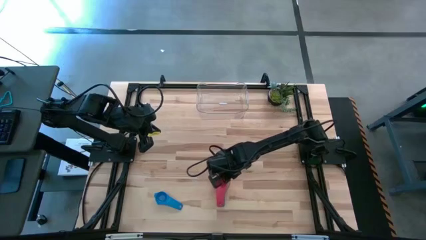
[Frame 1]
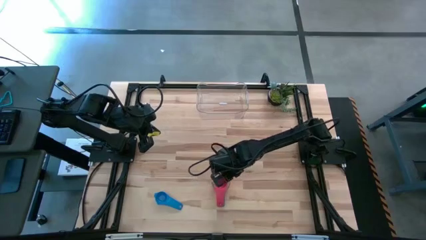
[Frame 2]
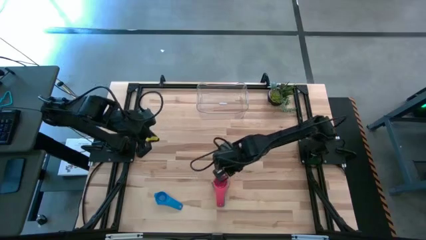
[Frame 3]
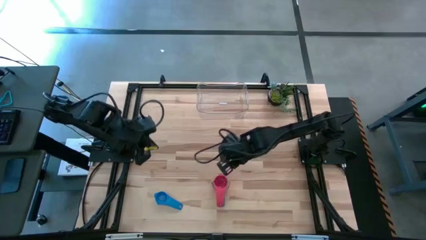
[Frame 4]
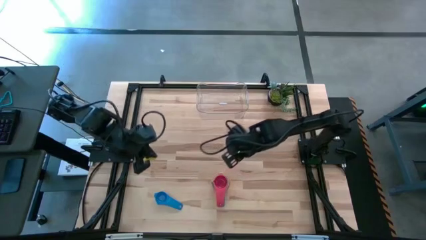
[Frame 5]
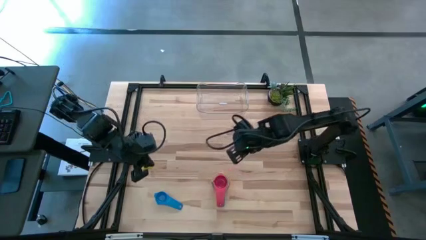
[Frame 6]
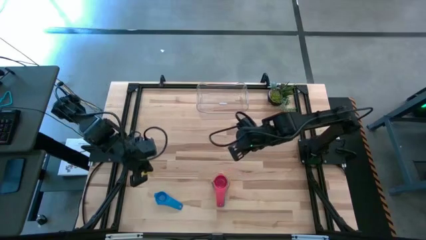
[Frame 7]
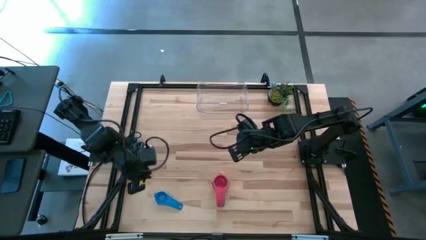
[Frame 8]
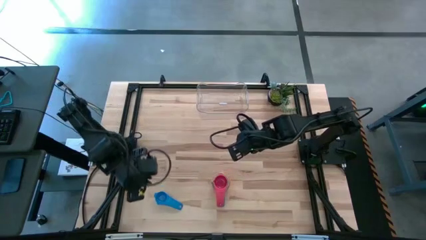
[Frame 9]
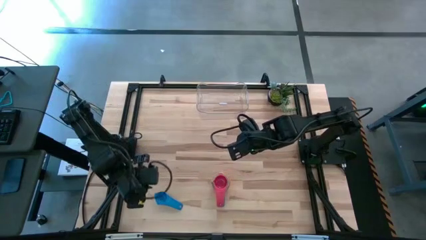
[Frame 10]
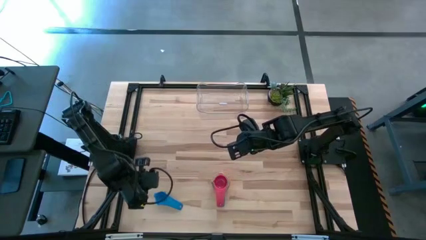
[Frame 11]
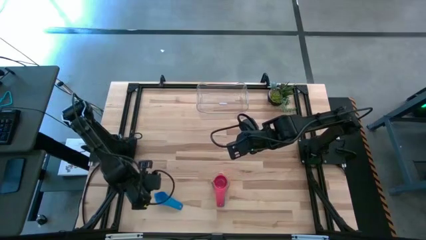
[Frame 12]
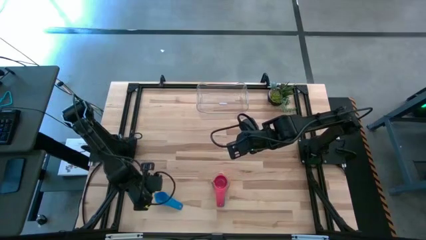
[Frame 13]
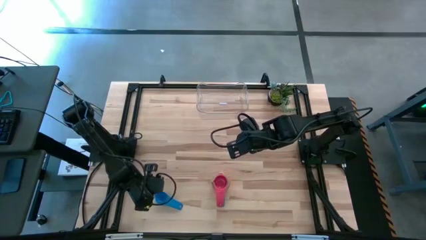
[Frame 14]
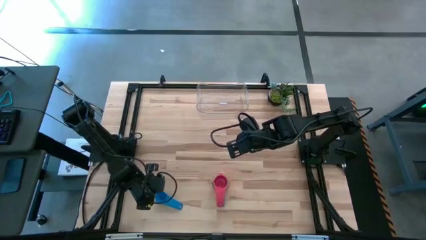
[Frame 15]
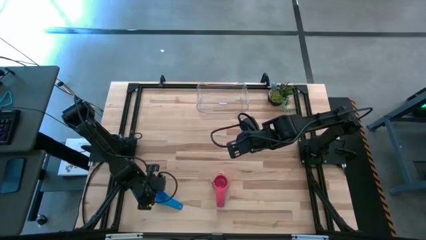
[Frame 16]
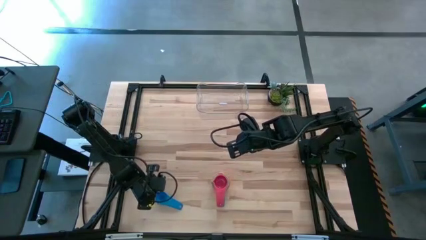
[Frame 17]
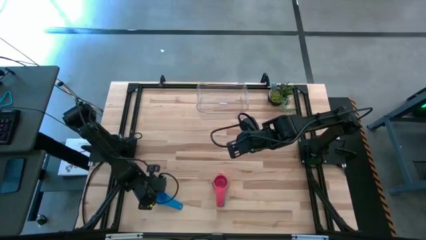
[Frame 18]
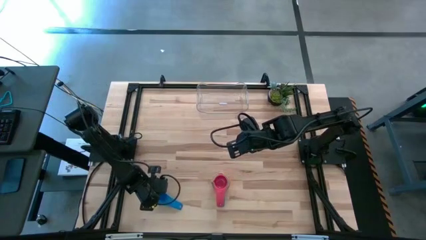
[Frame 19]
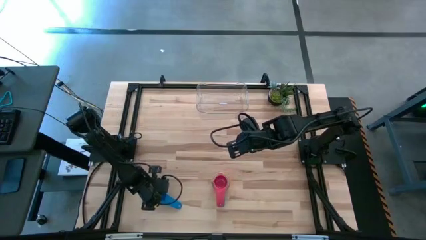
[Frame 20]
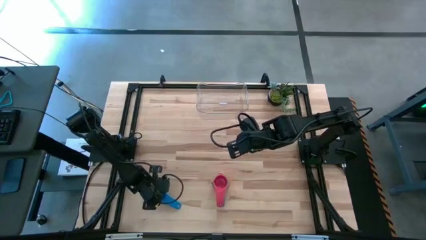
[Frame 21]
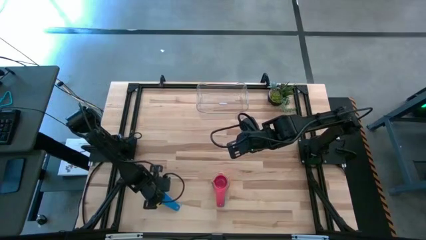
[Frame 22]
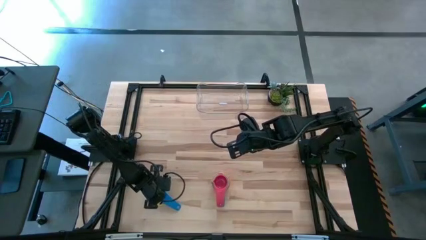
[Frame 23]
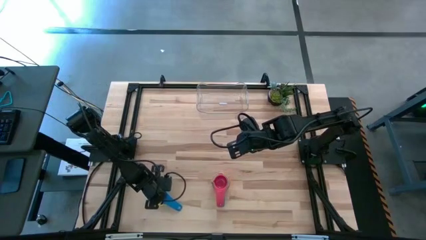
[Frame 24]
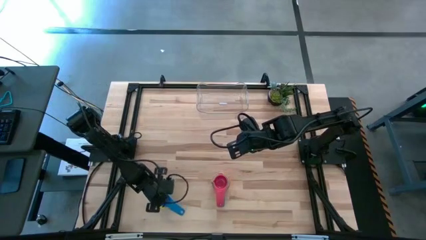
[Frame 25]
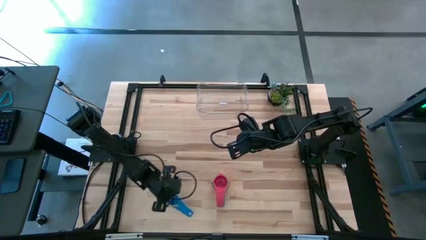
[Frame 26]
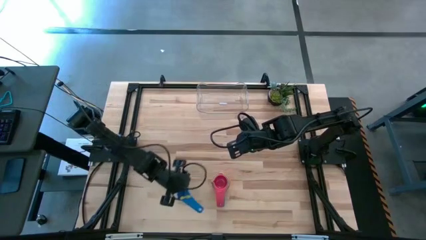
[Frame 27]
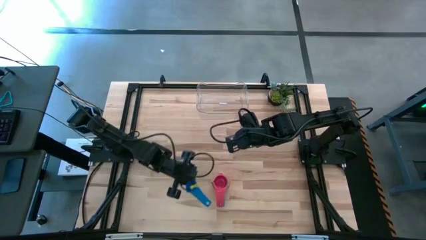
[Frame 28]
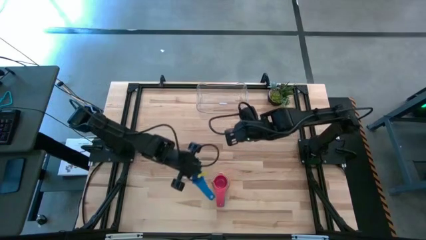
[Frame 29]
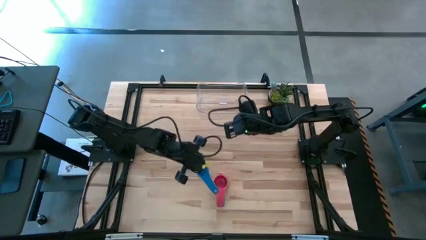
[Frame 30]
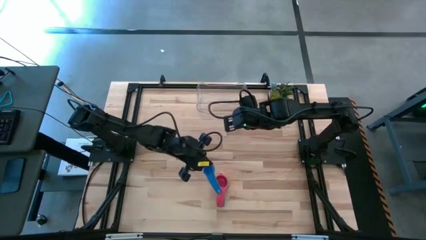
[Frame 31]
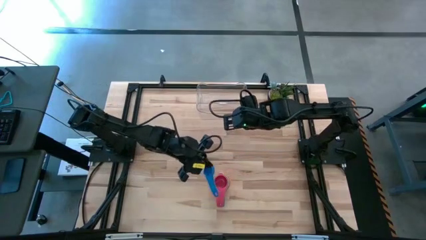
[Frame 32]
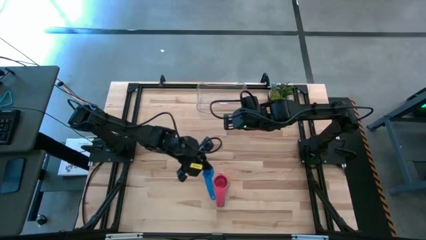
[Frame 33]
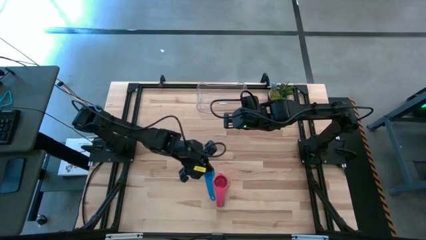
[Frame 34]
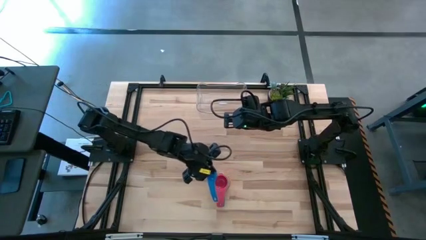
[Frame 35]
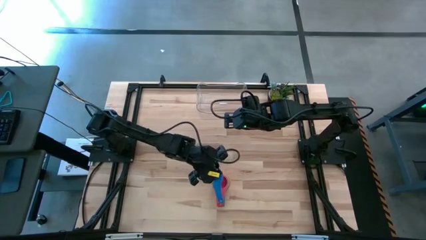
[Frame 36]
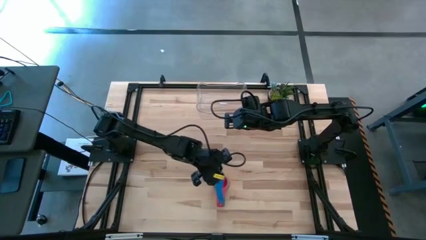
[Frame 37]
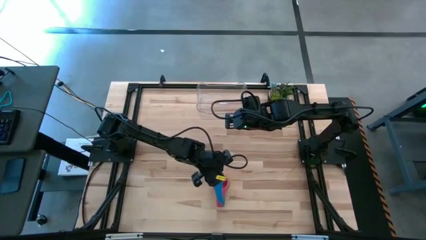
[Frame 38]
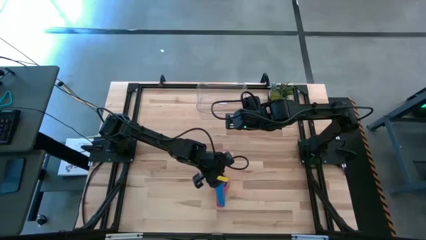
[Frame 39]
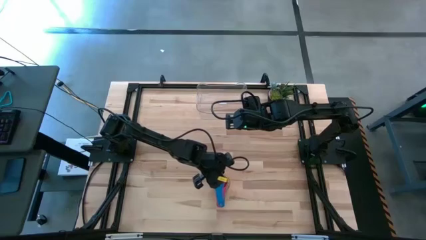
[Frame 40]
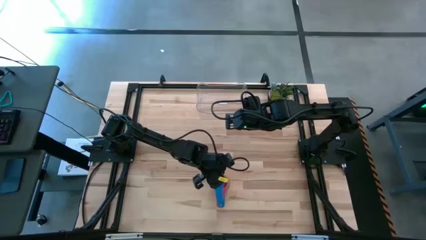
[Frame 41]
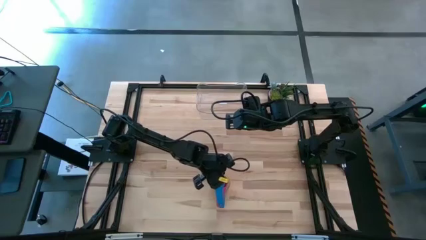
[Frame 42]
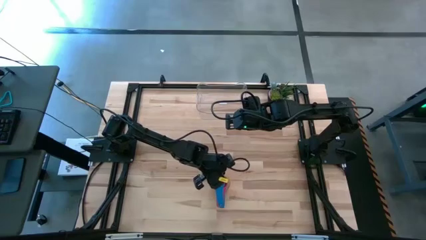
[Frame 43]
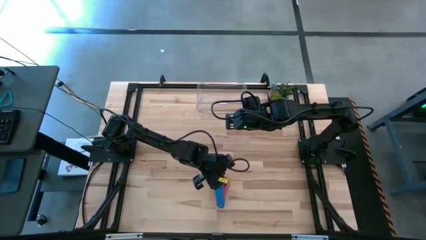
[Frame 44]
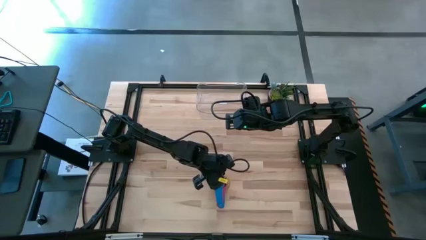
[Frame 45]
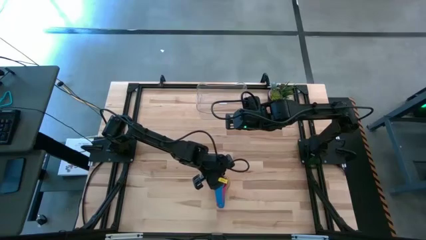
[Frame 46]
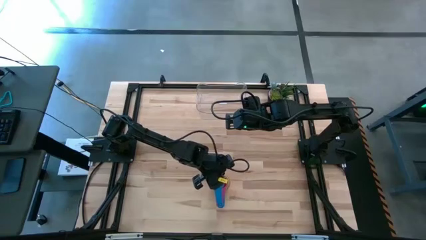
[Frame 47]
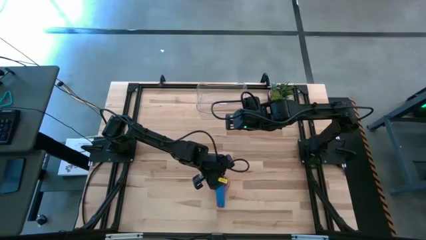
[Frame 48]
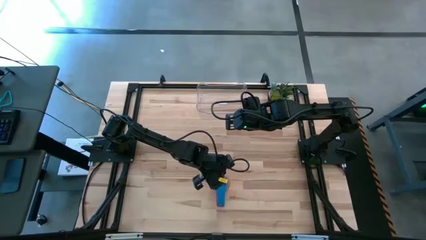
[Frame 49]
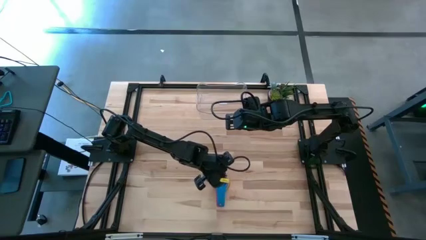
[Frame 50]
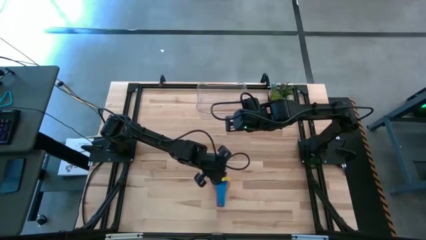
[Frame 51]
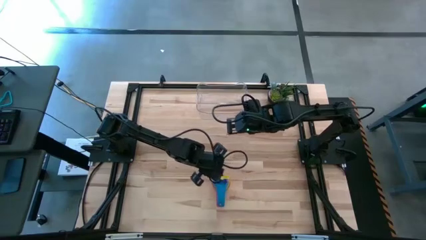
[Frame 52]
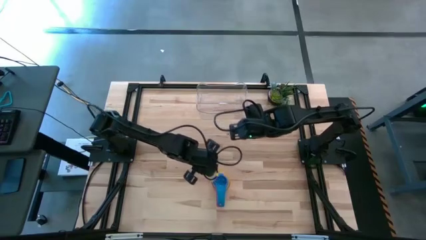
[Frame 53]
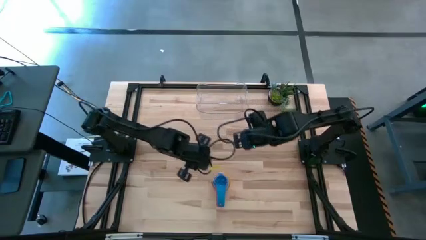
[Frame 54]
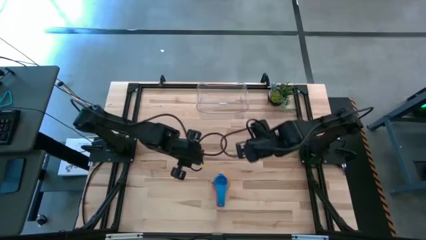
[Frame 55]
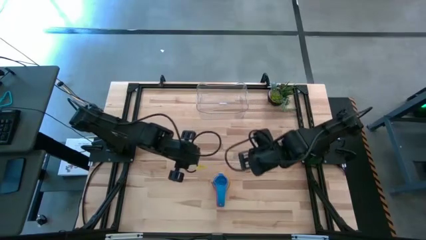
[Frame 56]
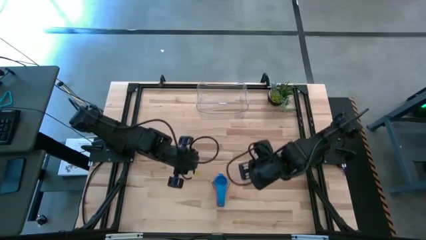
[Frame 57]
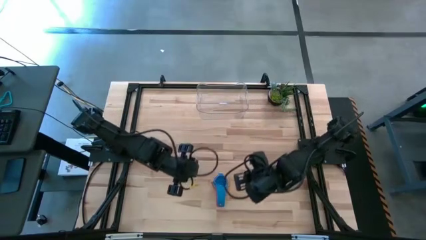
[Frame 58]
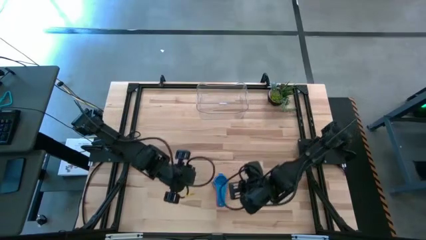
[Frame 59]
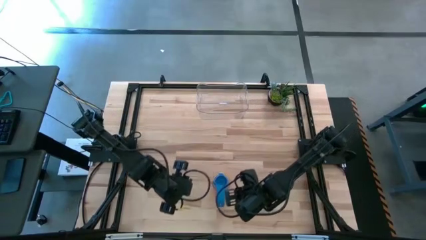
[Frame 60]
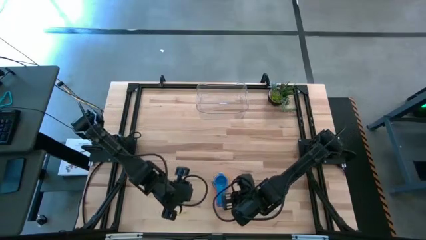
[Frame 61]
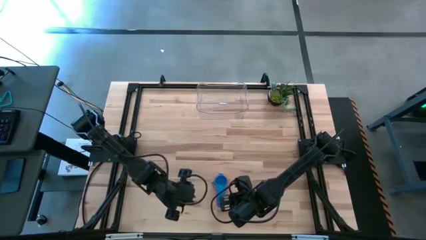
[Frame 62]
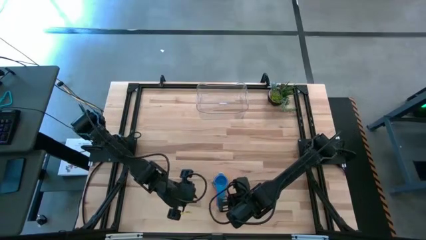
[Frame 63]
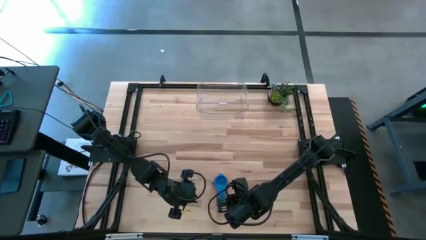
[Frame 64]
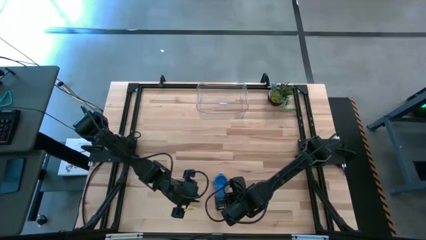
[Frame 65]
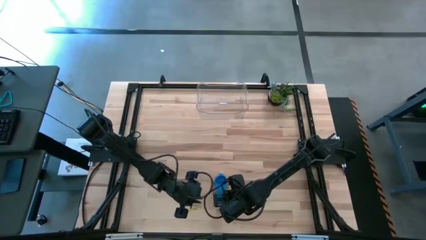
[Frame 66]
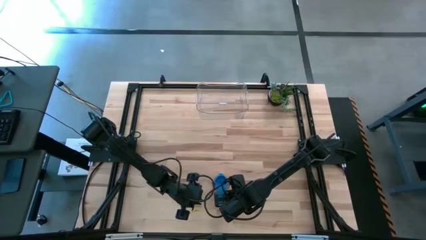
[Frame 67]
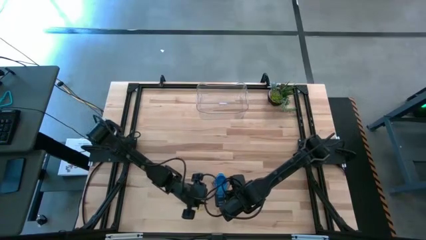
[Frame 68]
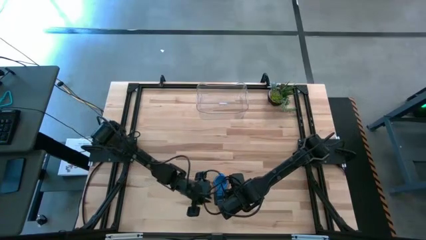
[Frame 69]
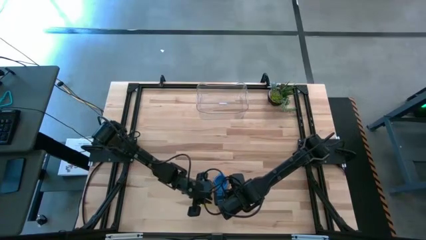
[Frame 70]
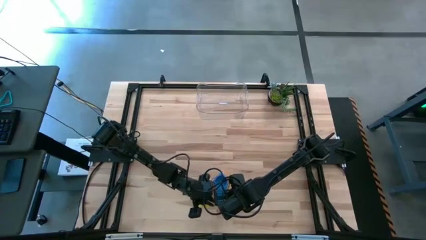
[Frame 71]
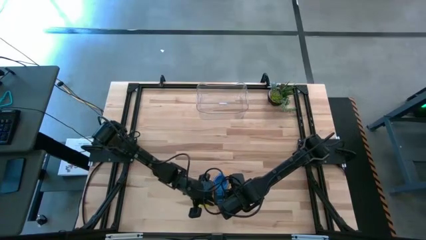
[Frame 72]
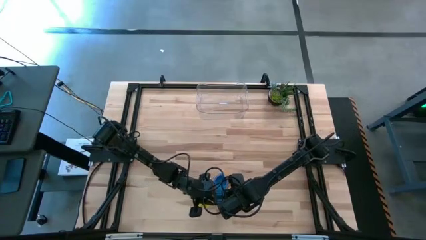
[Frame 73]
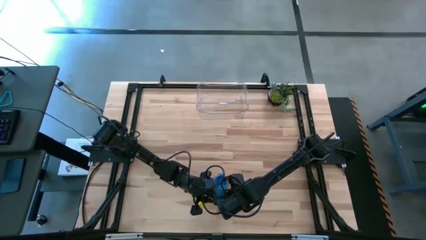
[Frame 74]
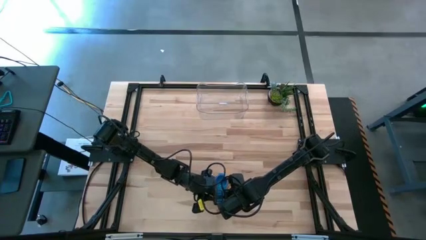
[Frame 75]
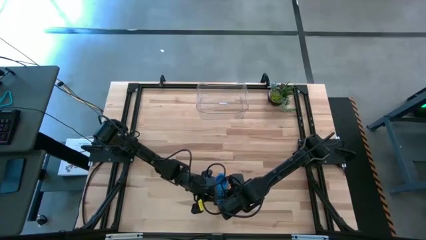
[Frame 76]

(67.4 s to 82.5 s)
Task: Nest measuring cups in basket
Stack the blue measuring cup on top of the red measuring cup
